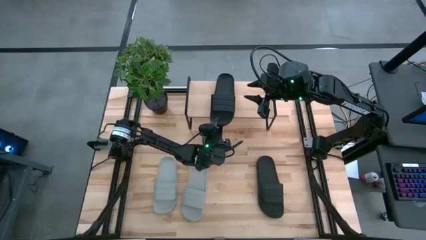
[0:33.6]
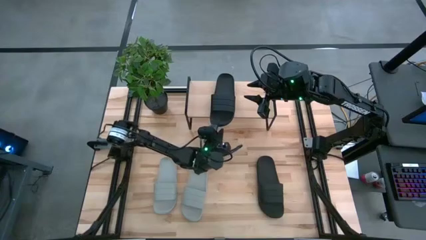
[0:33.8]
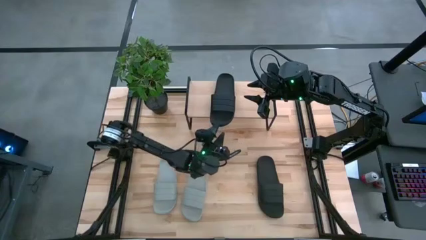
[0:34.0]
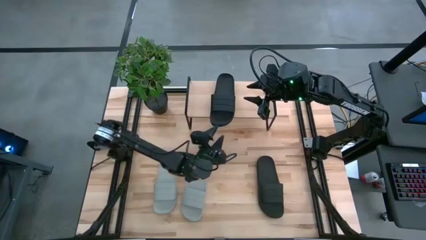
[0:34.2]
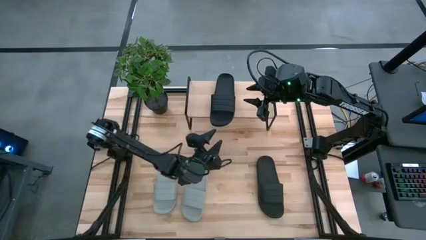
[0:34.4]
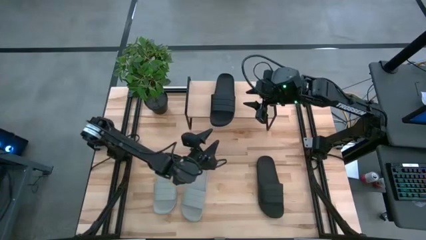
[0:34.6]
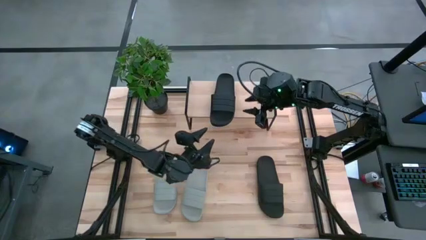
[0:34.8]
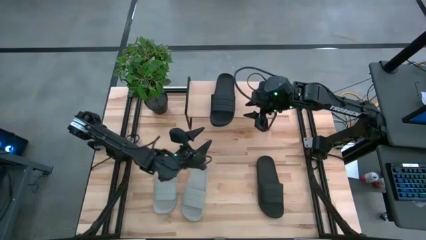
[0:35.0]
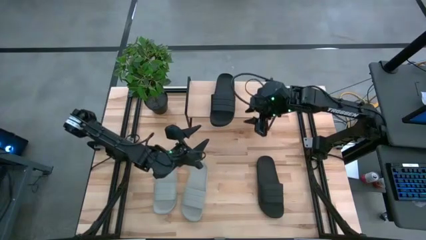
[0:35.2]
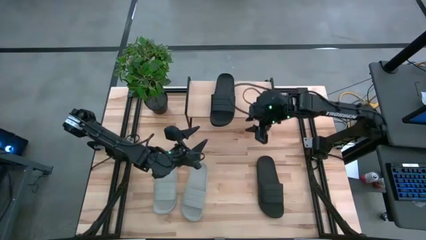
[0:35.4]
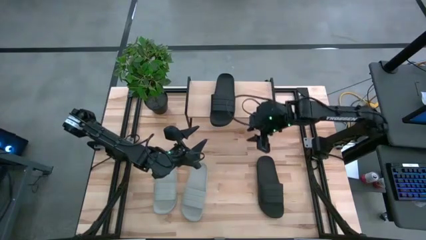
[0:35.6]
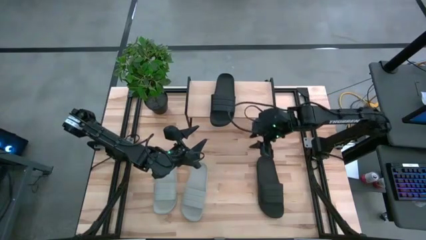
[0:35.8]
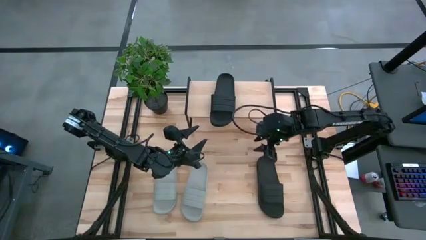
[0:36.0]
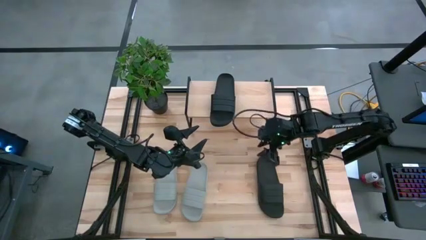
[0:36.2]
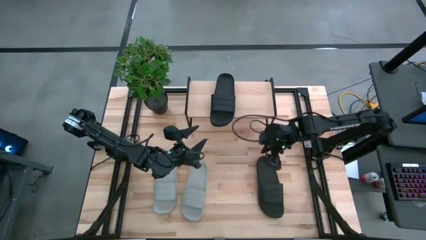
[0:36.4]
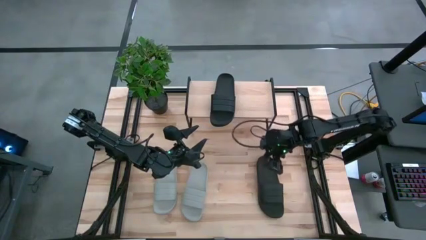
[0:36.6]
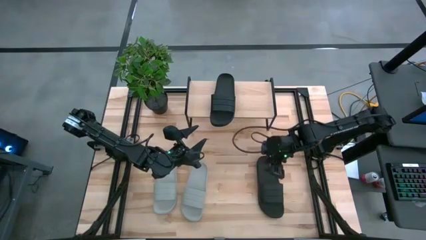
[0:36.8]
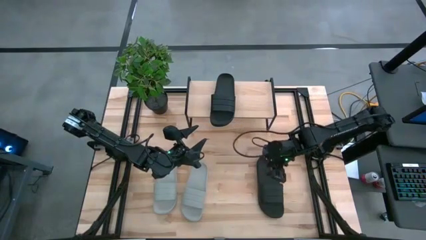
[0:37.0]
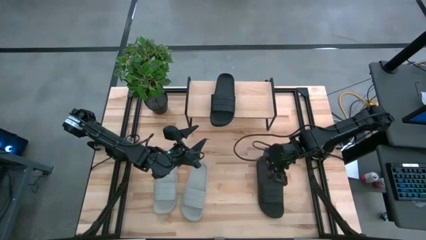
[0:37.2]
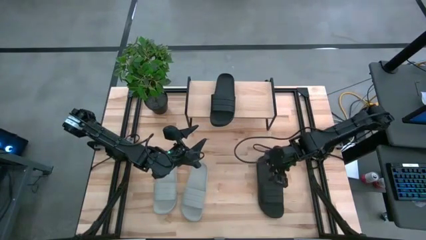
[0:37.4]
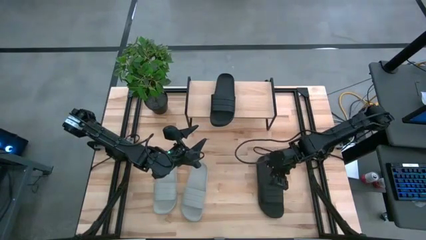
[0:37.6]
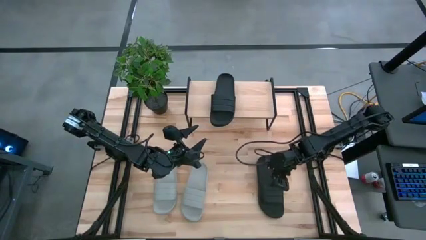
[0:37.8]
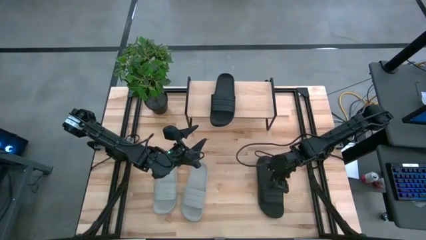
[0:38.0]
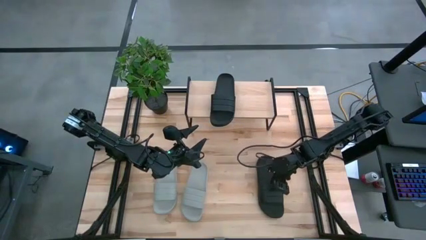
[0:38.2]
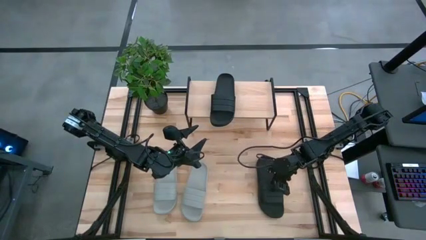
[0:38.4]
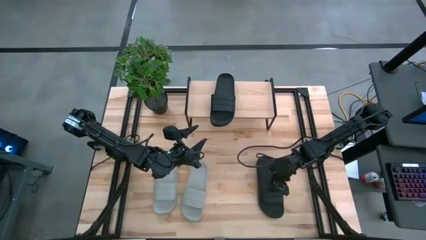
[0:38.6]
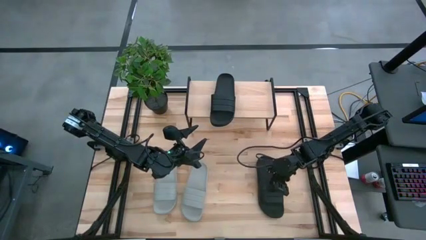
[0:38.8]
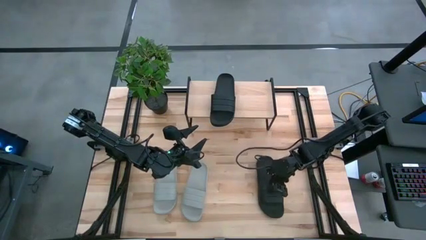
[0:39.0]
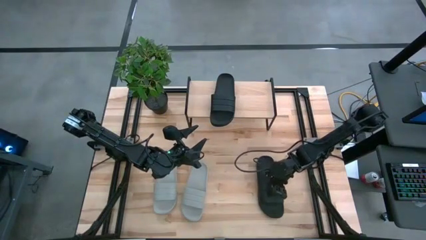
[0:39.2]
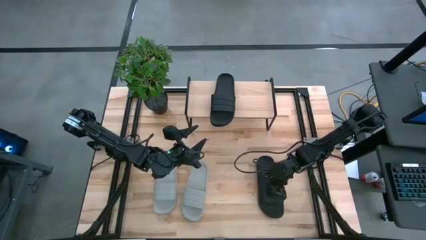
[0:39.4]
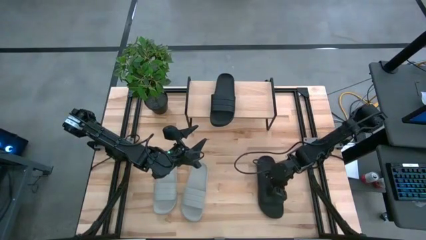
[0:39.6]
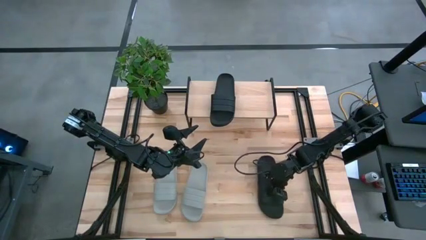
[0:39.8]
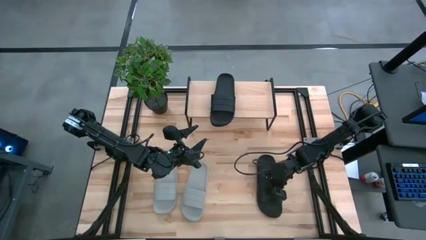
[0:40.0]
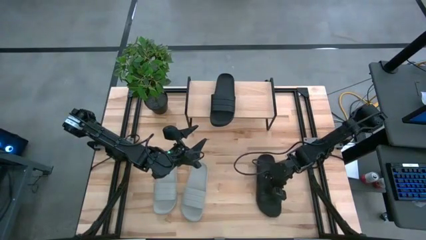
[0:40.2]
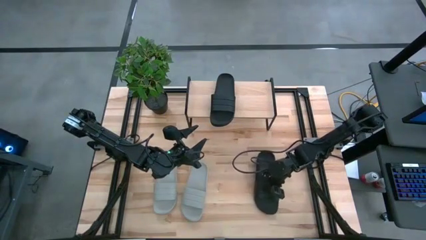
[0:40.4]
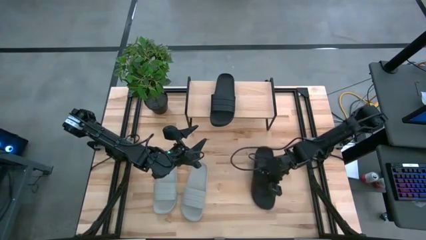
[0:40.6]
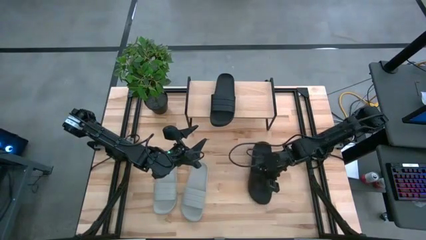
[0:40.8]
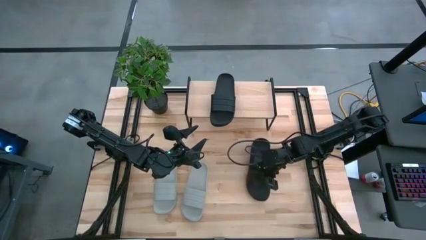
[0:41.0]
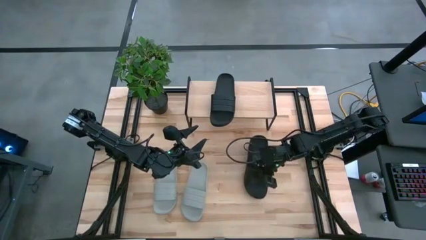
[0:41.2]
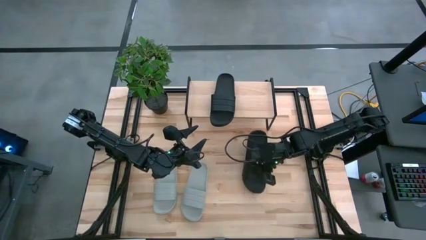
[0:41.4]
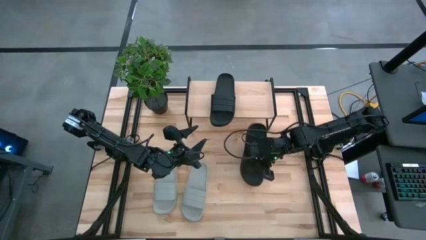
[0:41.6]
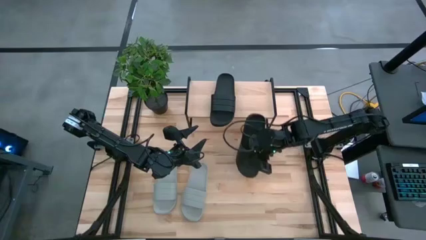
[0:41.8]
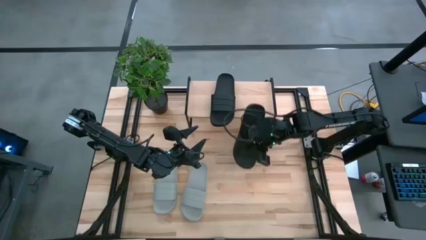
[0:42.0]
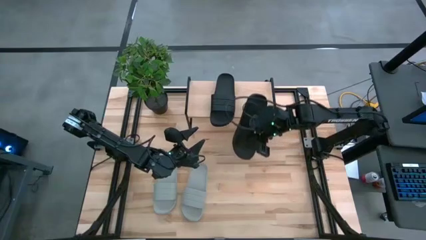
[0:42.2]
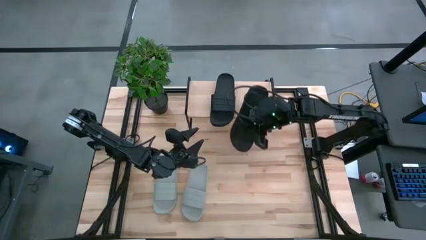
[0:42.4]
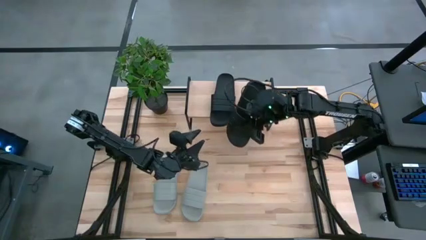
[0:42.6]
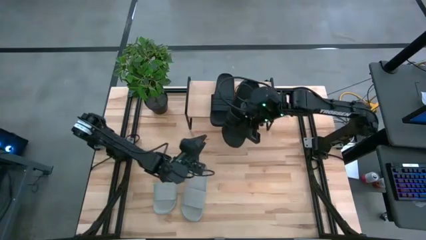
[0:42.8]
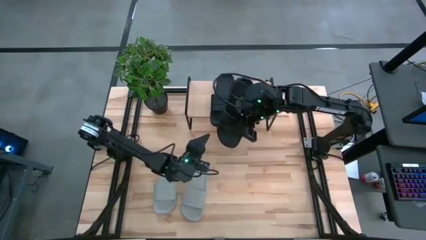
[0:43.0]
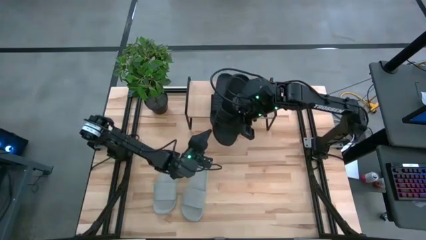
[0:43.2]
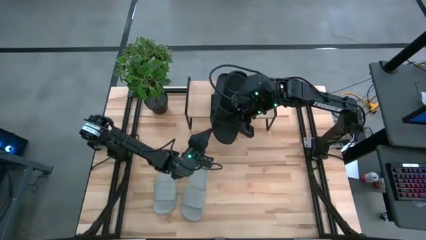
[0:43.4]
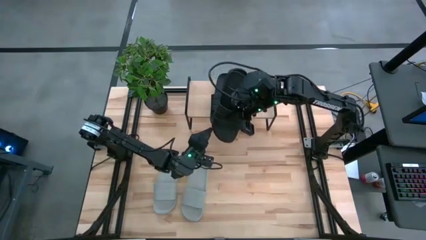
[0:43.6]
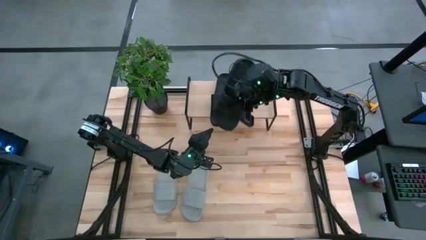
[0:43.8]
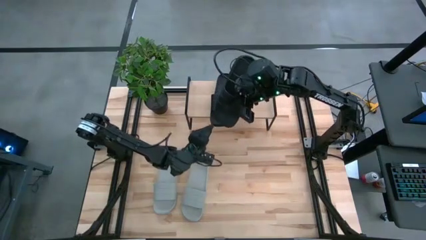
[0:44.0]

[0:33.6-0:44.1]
Task: Pick and place slides into the shelf
Put the black slide on the shelf
